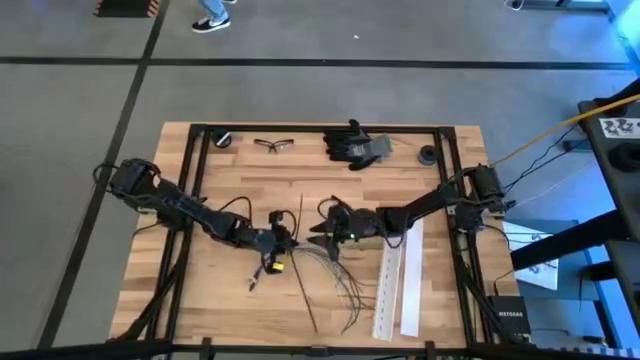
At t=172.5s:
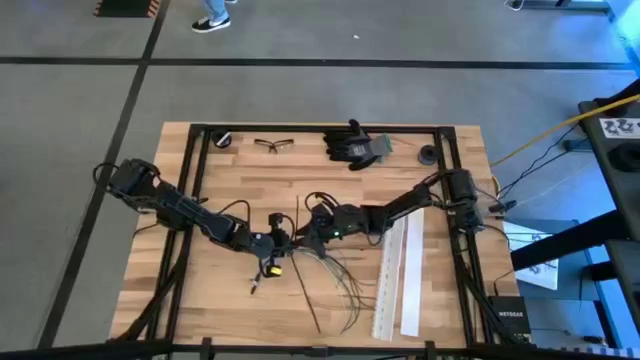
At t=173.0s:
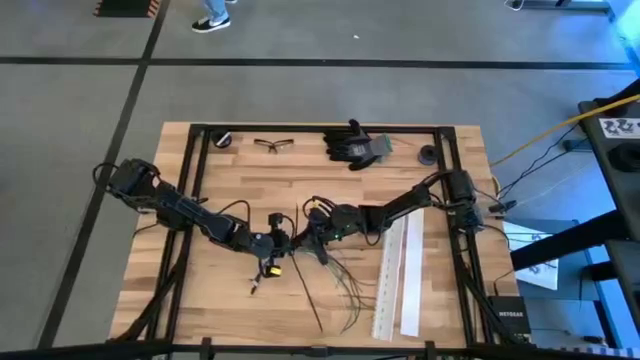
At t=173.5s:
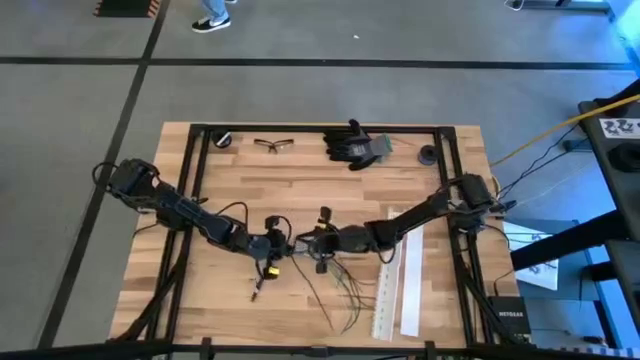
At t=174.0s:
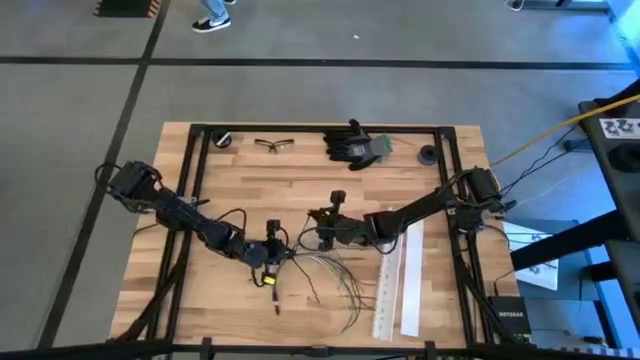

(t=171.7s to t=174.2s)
Task: Ziptie cables
Wrap the zip tie on the cables

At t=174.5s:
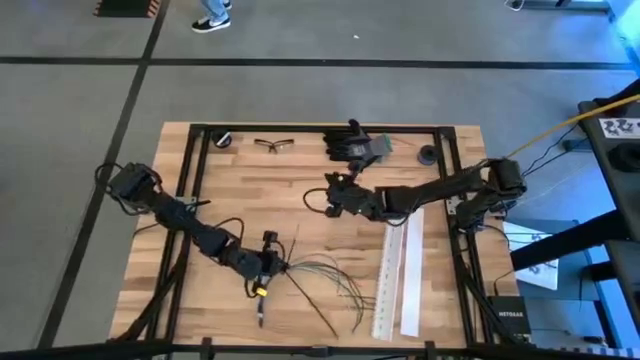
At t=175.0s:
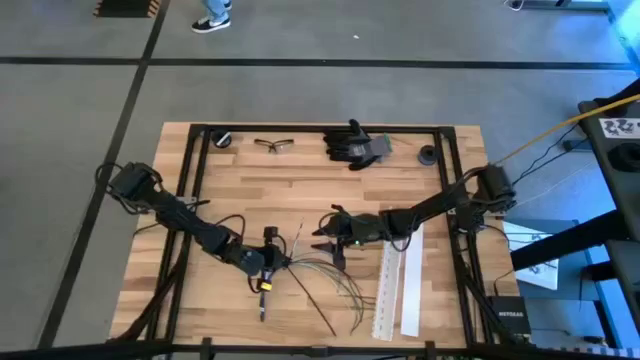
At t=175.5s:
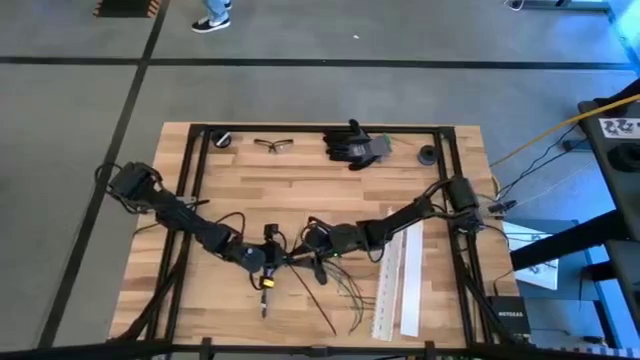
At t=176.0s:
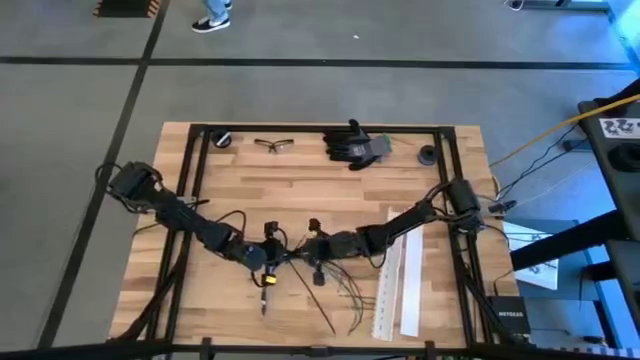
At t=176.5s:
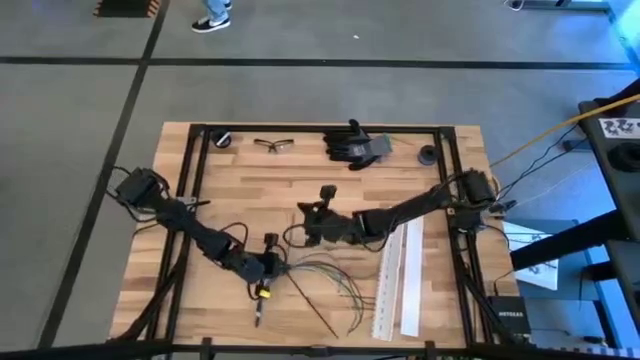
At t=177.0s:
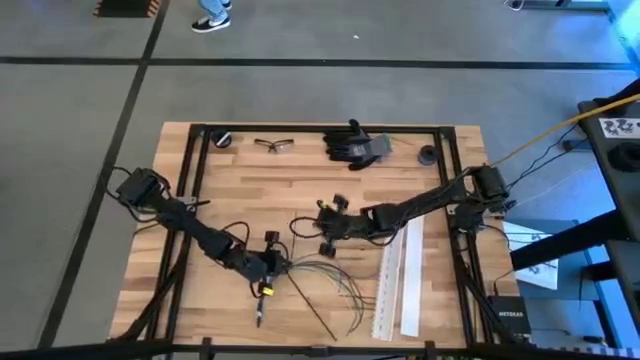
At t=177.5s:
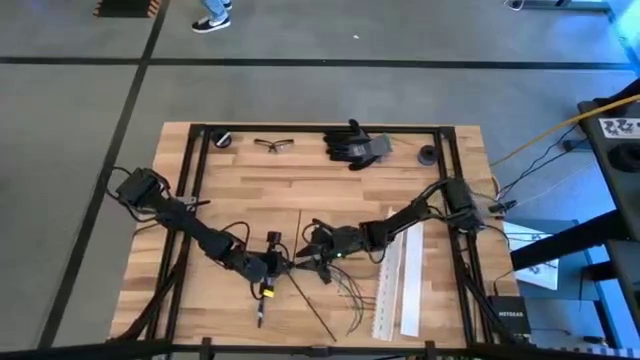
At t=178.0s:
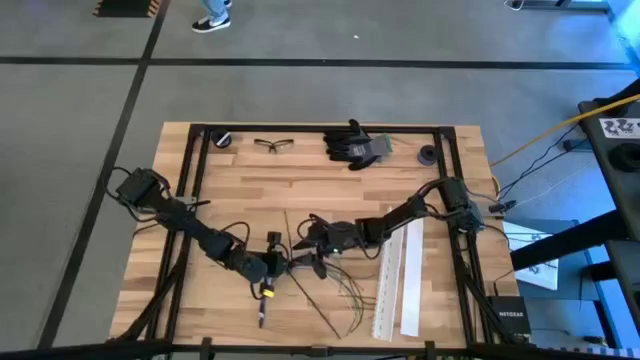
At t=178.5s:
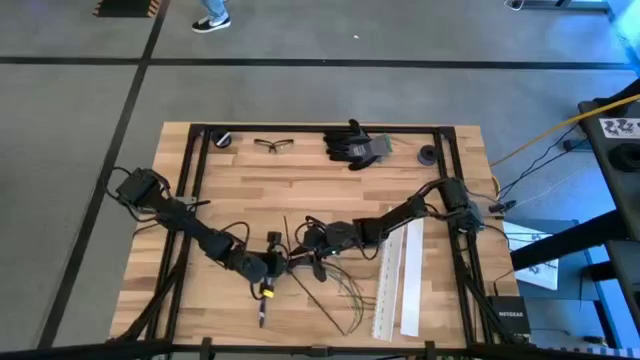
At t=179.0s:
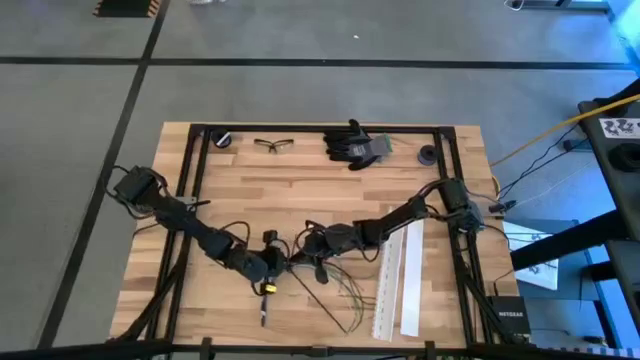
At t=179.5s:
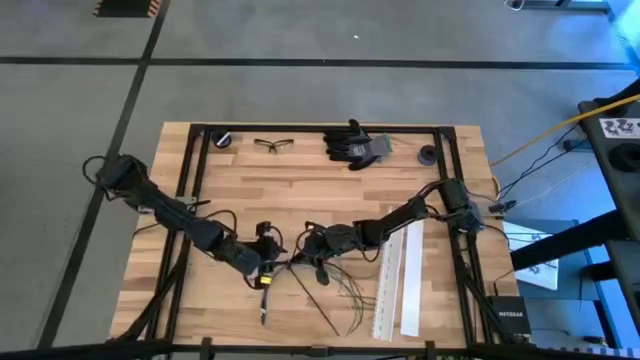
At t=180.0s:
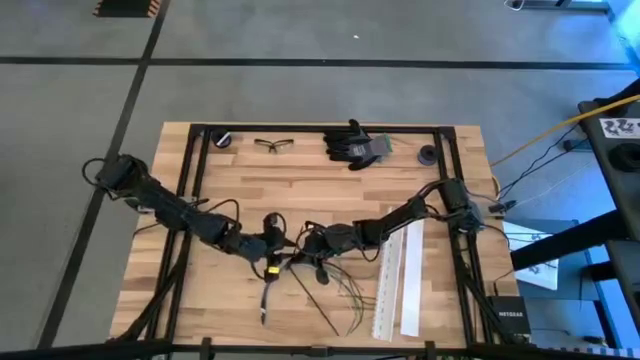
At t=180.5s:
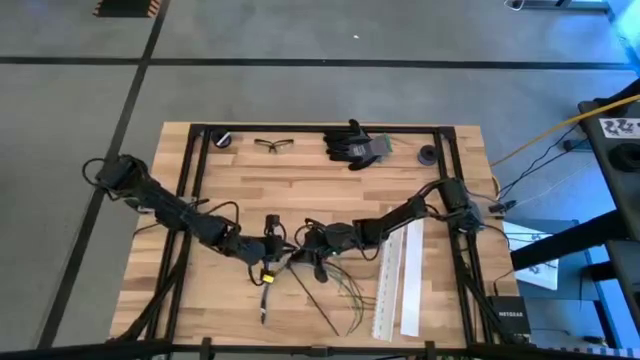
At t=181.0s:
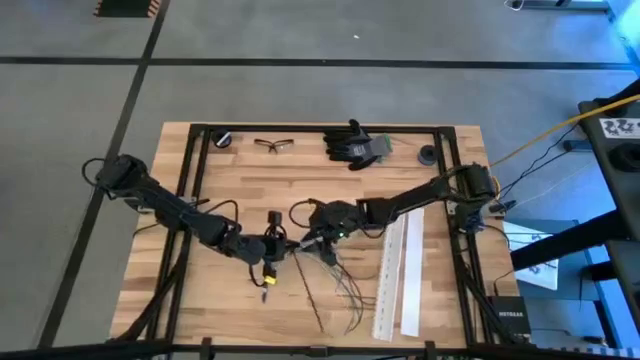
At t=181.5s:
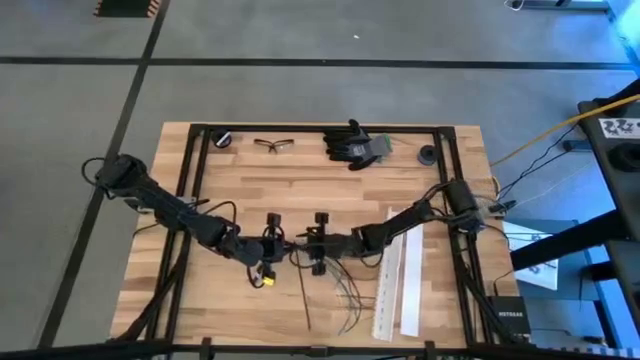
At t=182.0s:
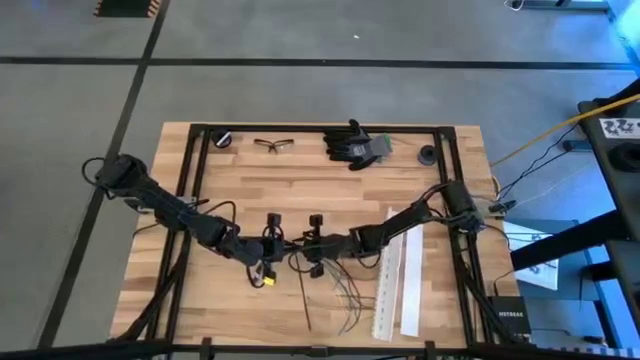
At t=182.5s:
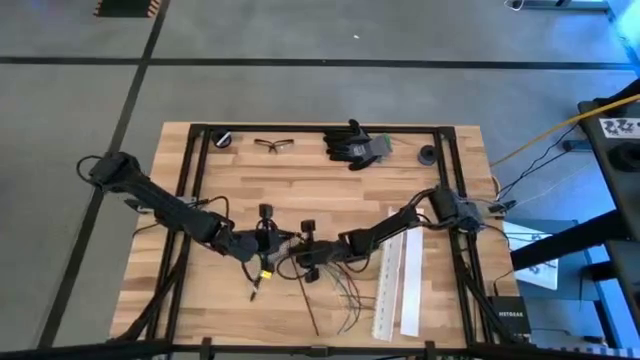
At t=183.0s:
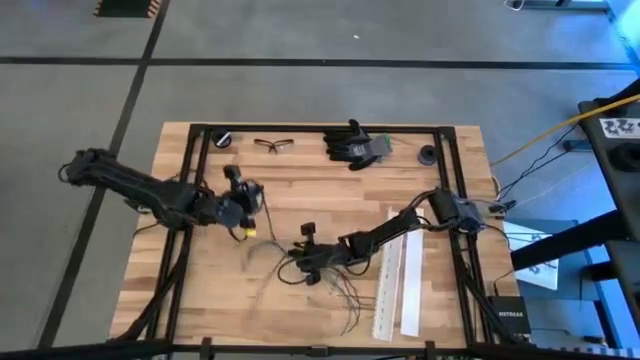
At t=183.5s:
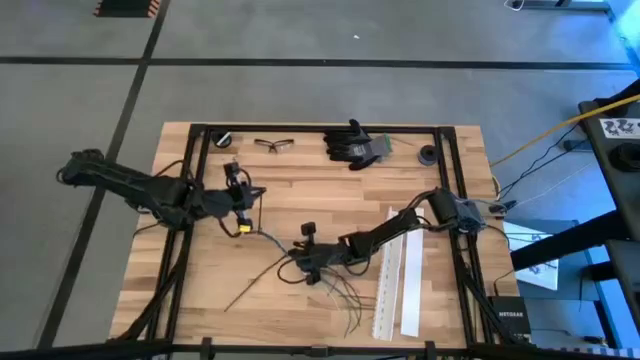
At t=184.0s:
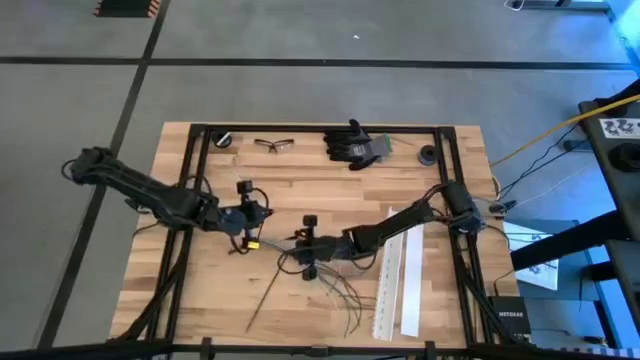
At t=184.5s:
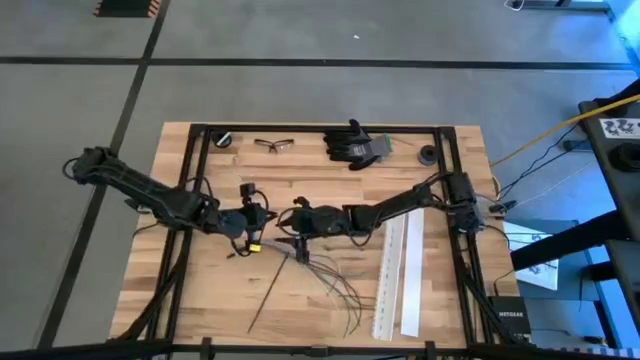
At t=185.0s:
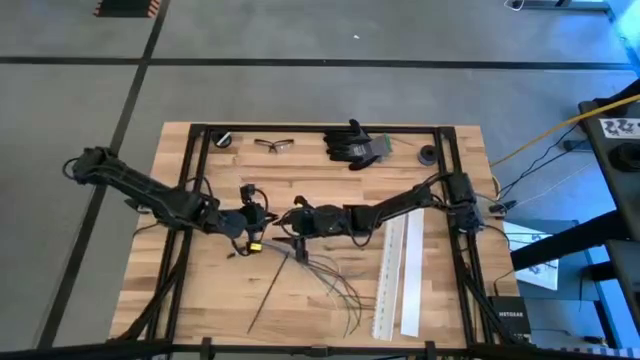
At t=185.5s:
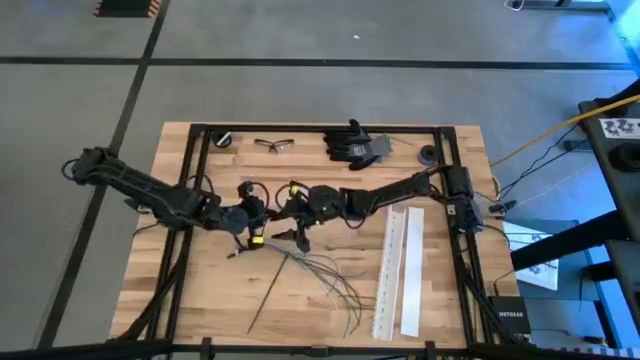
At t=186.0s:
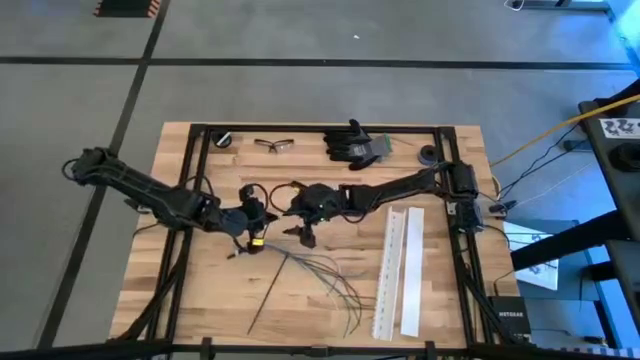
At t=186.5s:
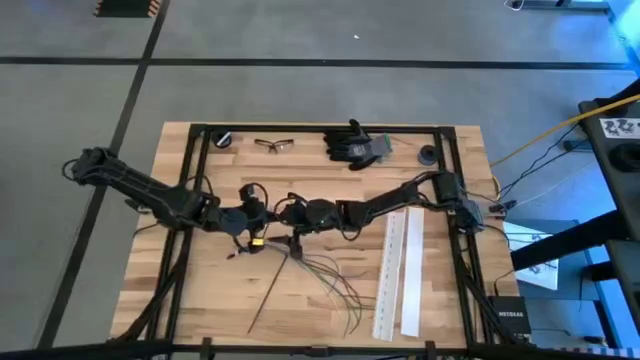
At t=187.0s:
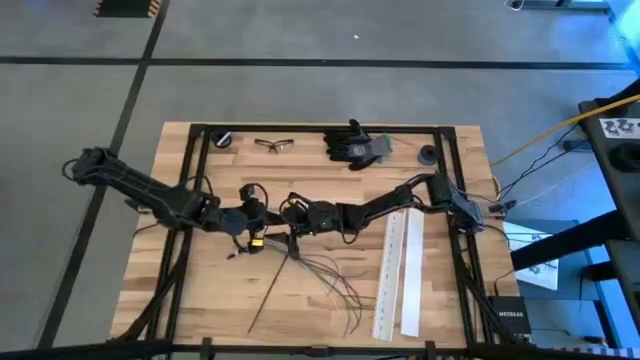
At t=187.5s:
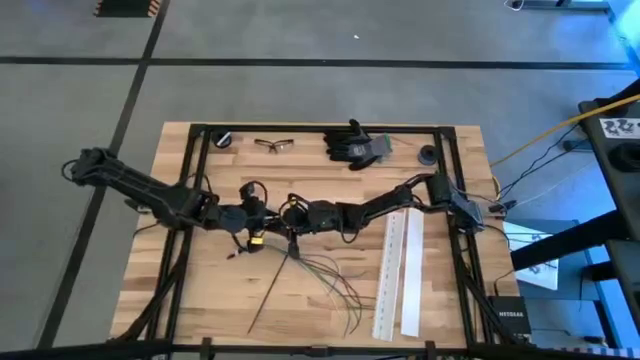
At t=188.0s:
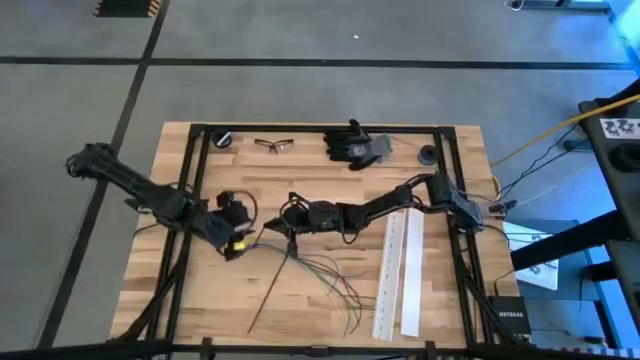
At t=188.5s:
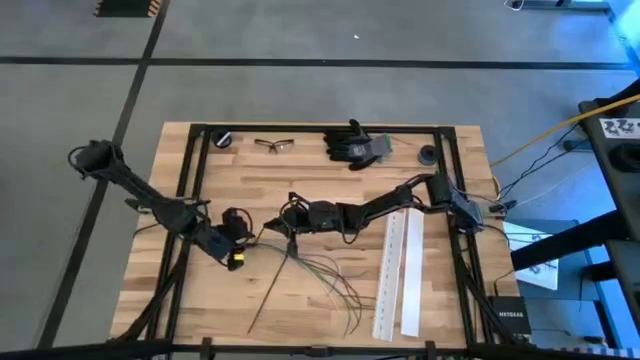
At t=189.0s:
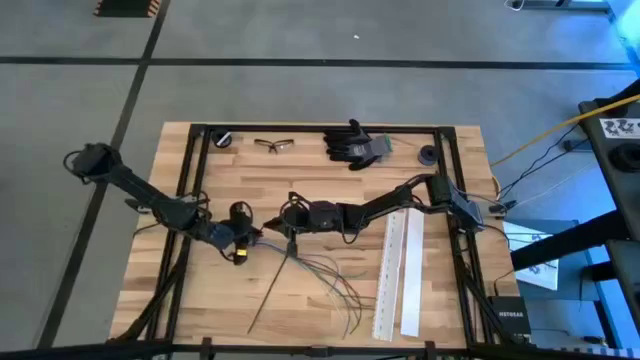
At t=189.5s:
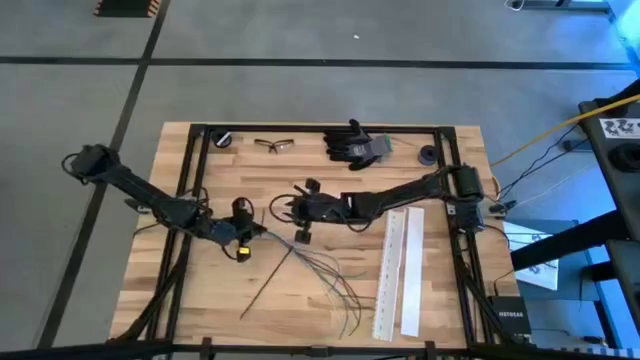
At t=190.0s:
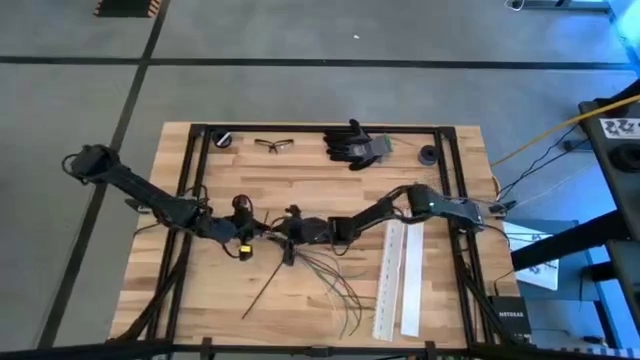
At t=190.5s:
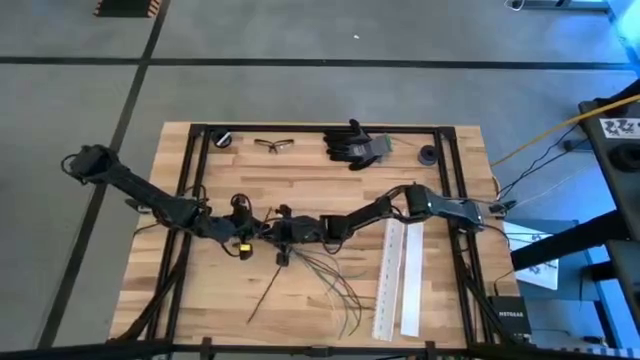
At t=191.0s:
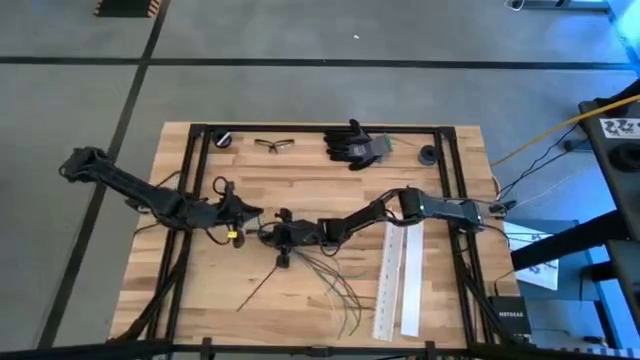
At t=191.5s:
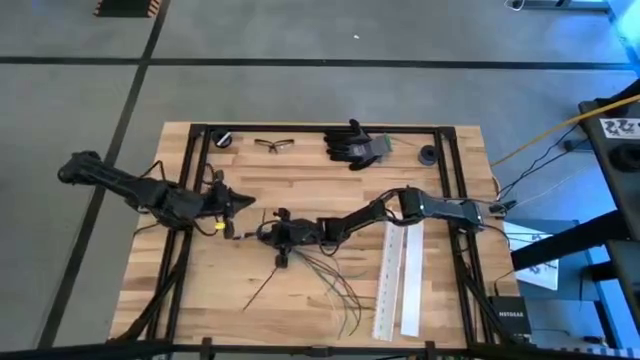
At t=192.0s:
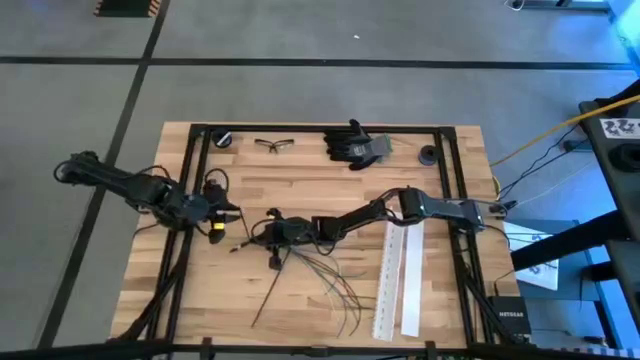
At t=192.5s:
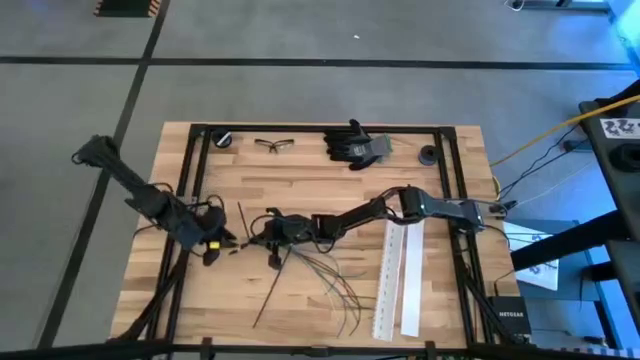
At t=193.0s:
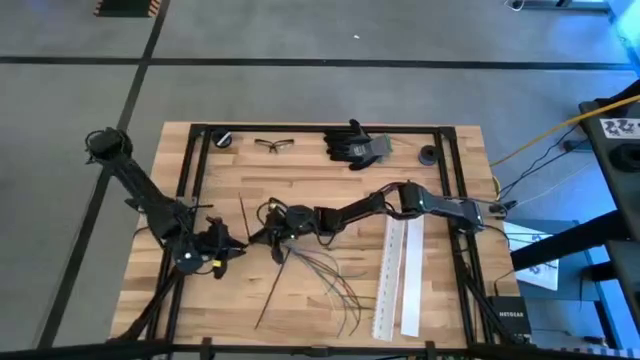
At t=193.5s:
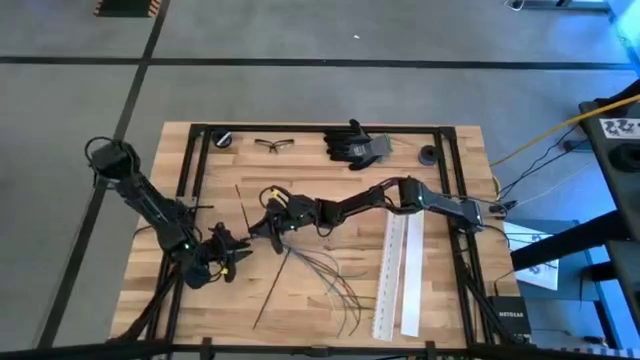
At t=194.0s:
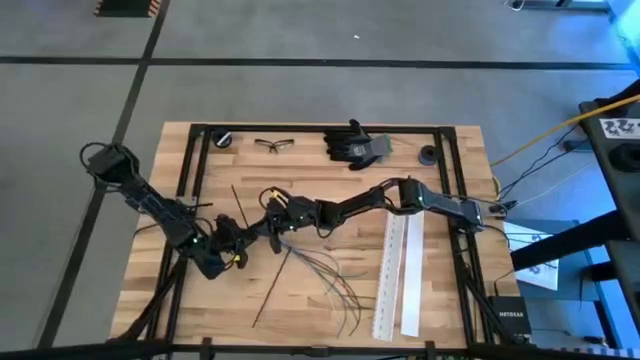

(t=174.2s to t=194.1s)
Wrap the zip tie on the cables
